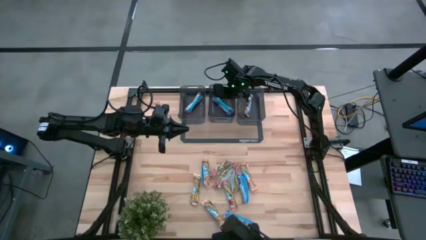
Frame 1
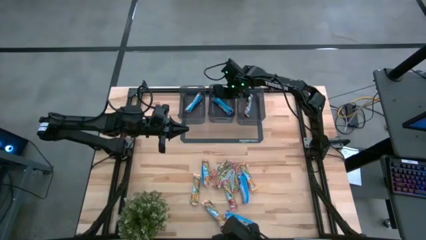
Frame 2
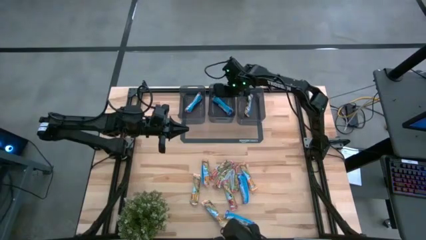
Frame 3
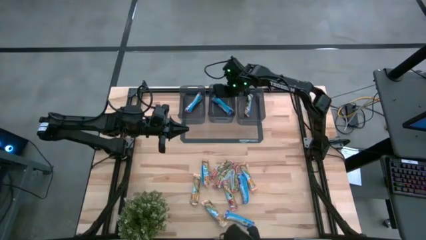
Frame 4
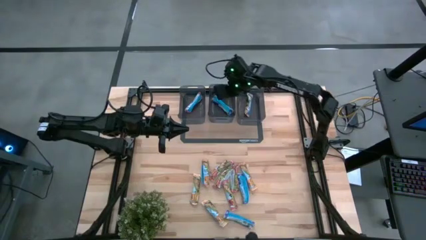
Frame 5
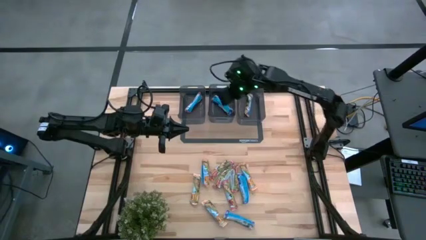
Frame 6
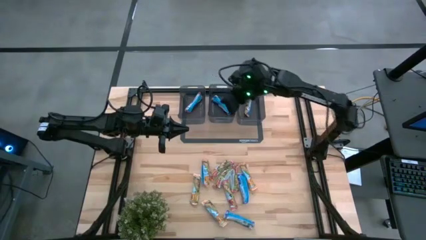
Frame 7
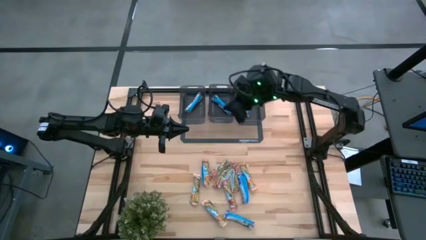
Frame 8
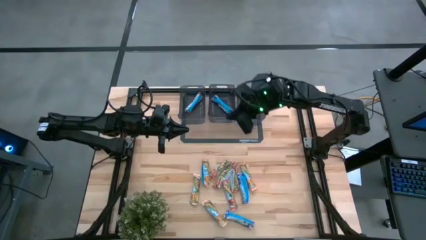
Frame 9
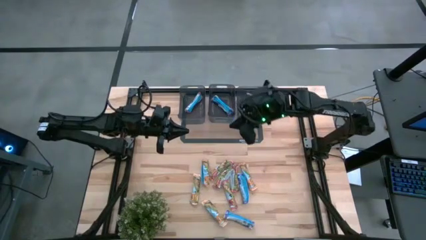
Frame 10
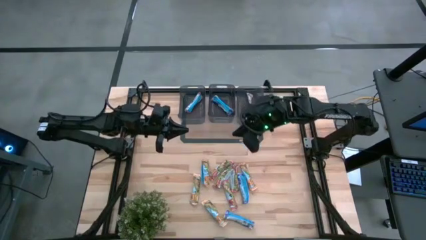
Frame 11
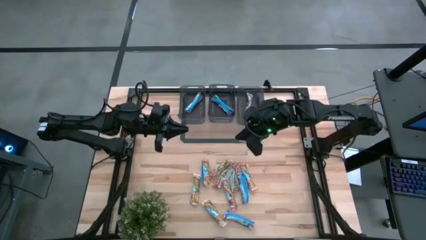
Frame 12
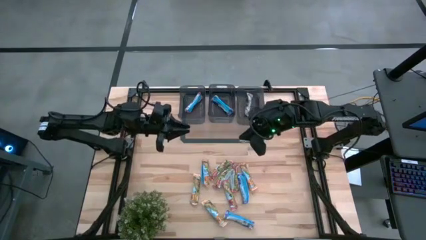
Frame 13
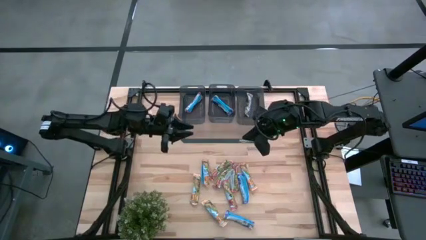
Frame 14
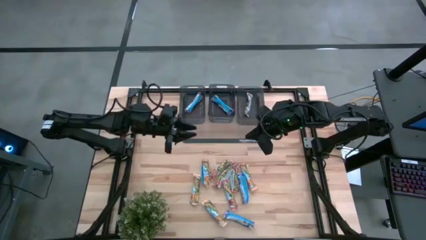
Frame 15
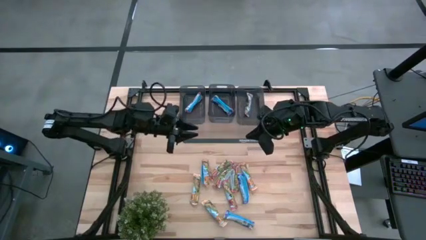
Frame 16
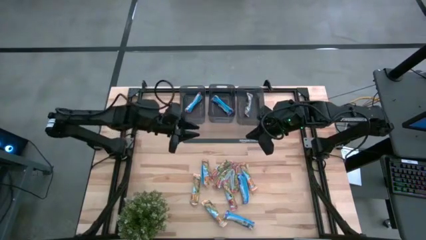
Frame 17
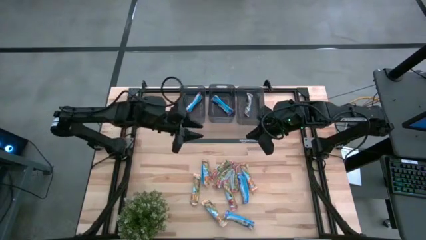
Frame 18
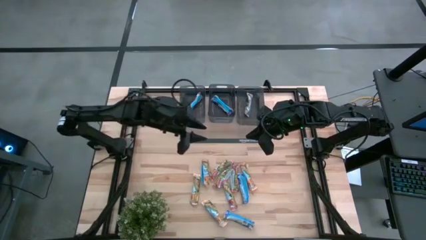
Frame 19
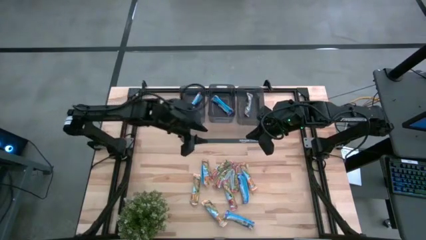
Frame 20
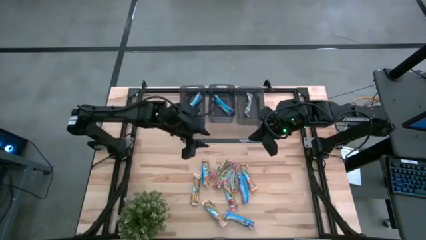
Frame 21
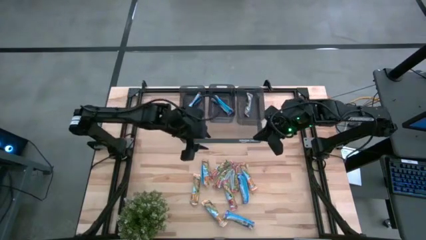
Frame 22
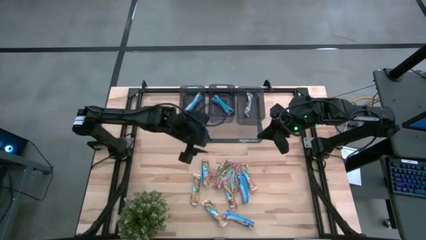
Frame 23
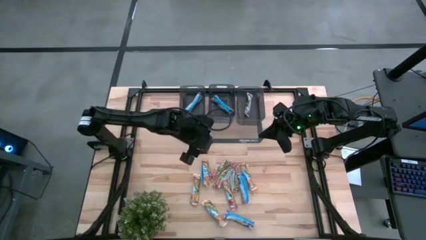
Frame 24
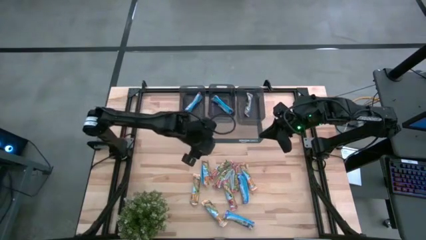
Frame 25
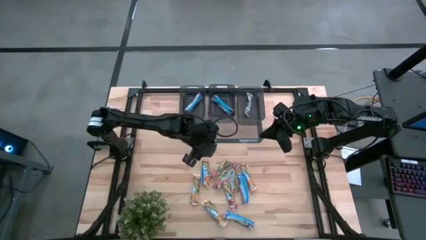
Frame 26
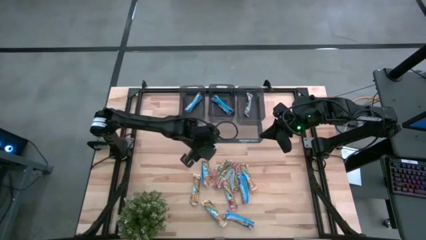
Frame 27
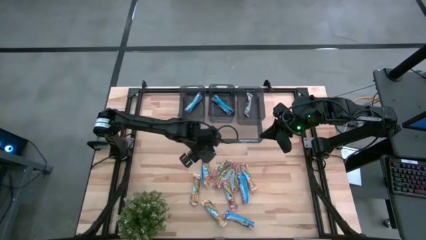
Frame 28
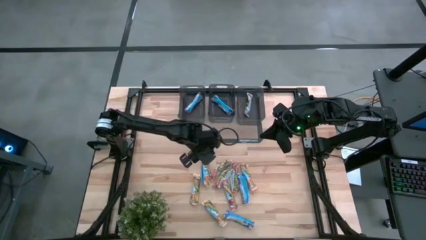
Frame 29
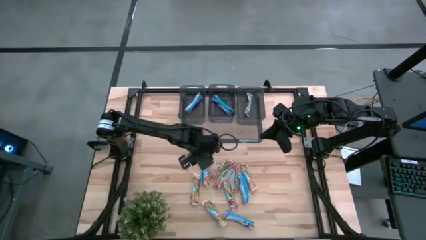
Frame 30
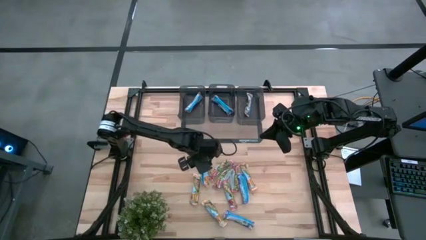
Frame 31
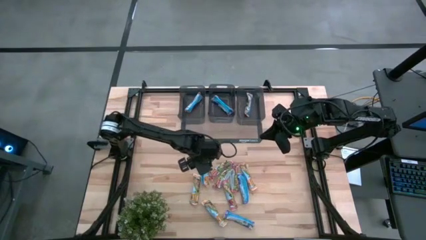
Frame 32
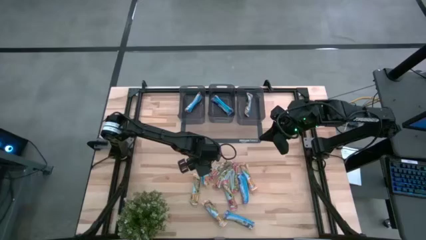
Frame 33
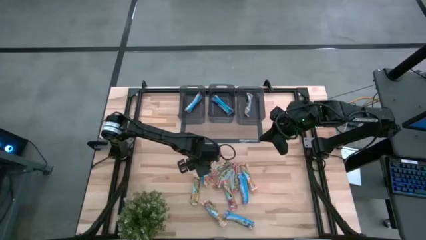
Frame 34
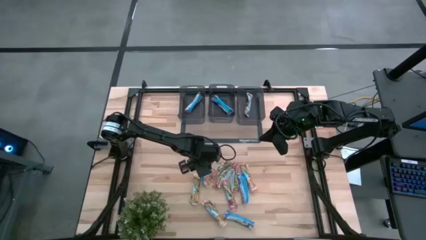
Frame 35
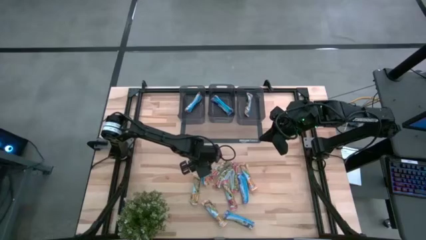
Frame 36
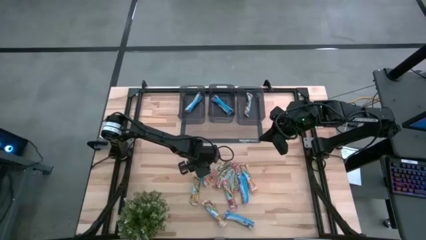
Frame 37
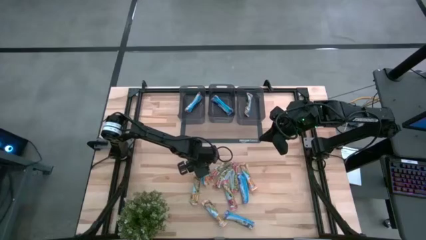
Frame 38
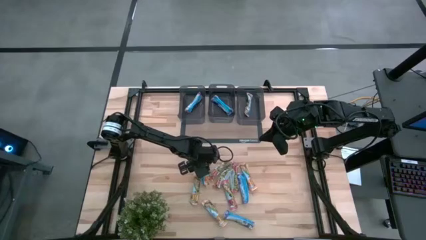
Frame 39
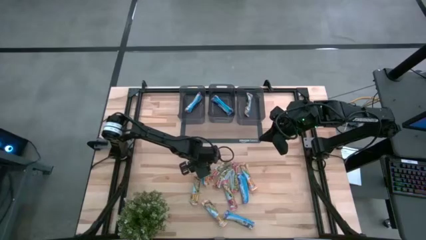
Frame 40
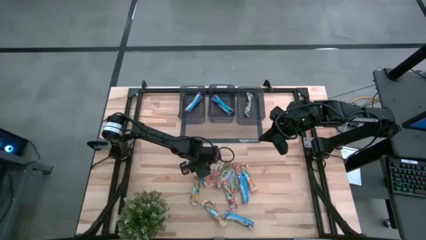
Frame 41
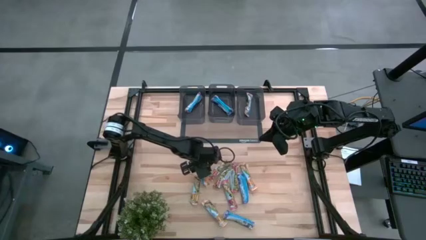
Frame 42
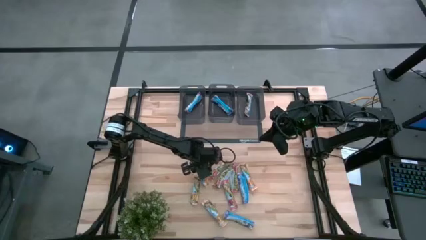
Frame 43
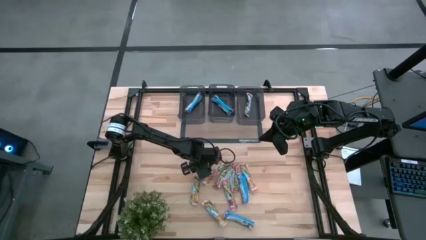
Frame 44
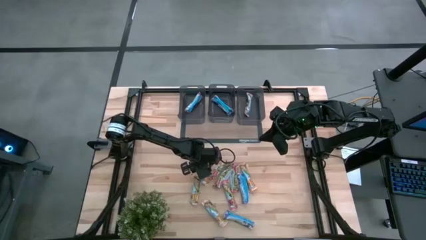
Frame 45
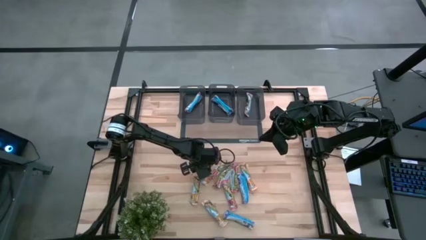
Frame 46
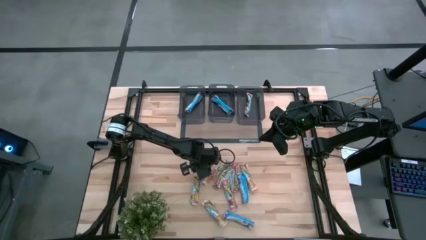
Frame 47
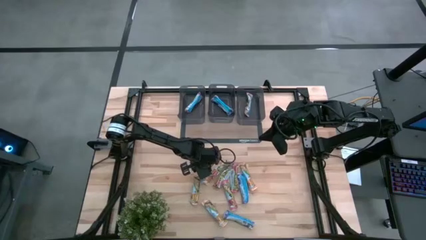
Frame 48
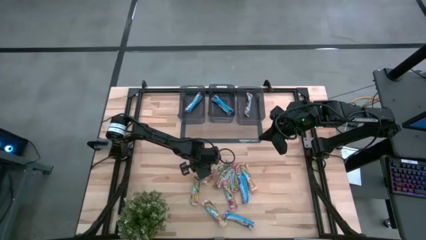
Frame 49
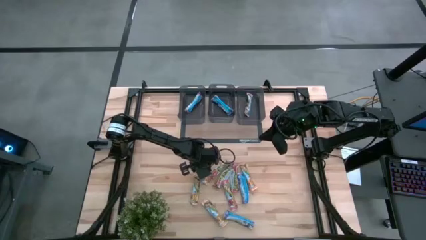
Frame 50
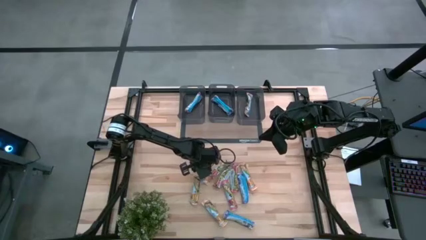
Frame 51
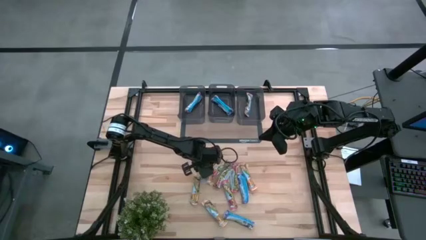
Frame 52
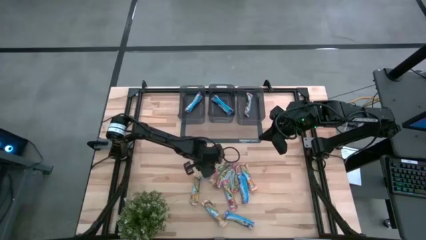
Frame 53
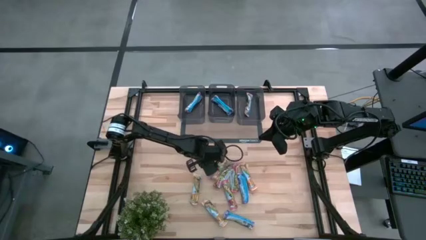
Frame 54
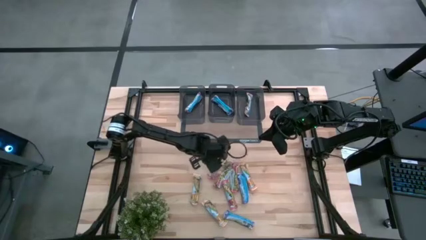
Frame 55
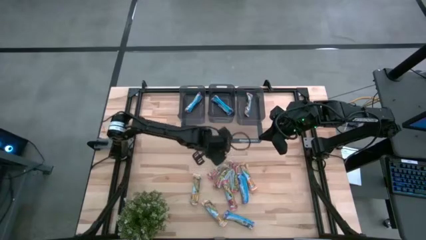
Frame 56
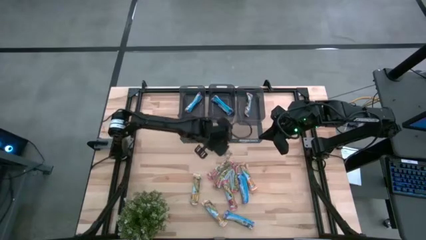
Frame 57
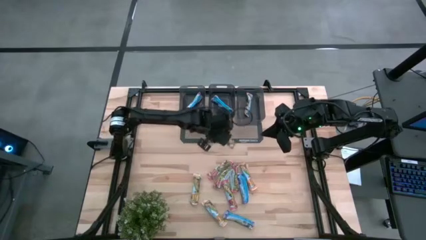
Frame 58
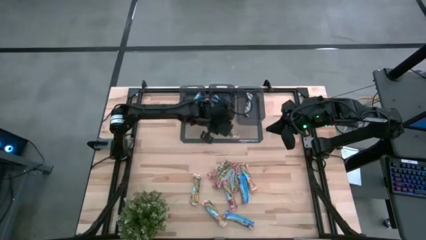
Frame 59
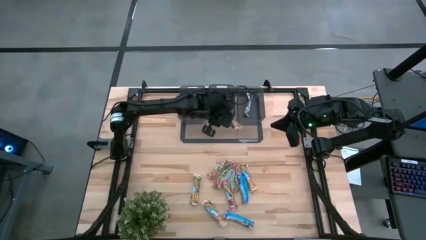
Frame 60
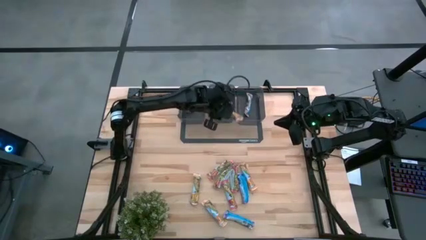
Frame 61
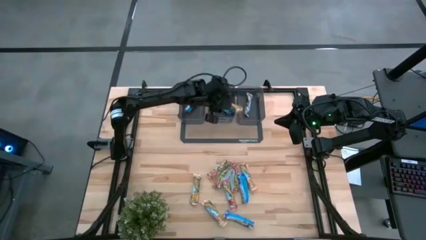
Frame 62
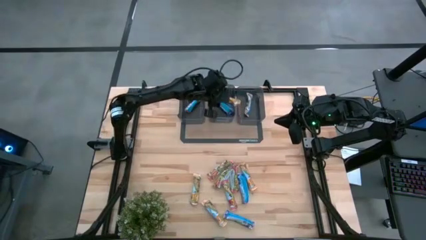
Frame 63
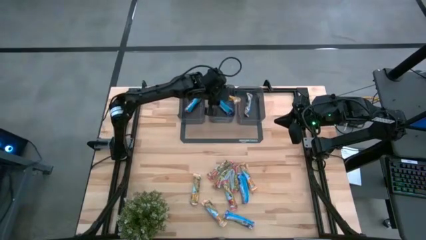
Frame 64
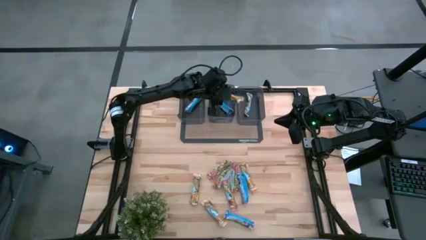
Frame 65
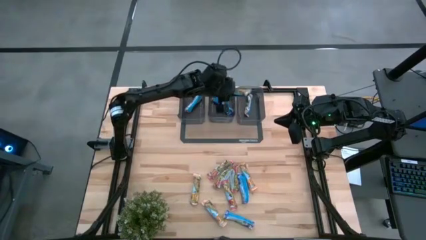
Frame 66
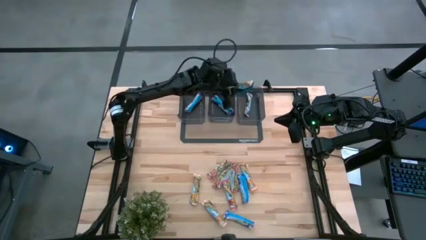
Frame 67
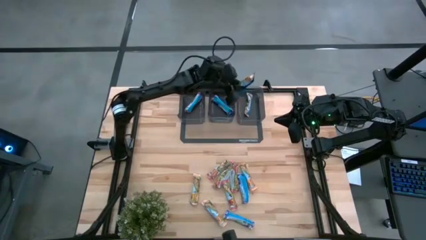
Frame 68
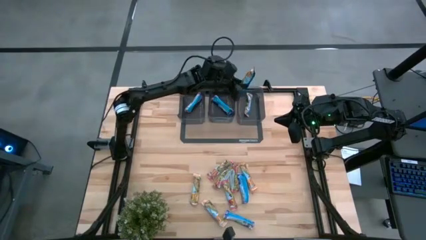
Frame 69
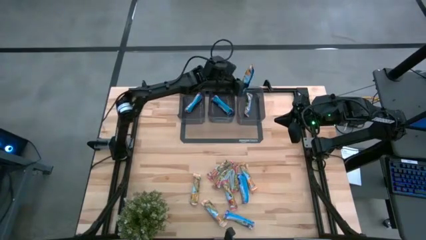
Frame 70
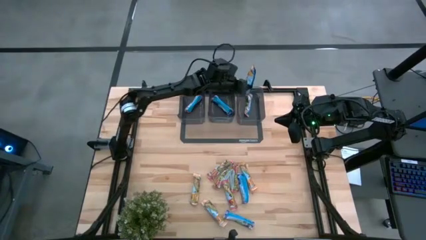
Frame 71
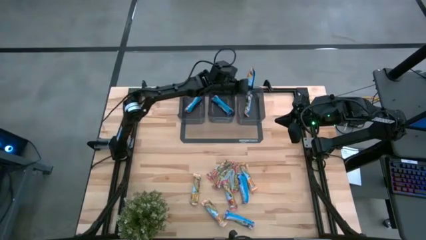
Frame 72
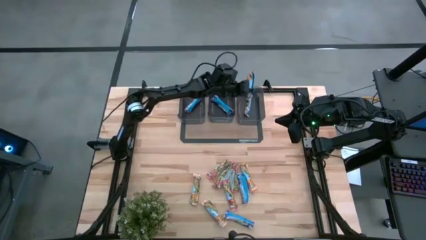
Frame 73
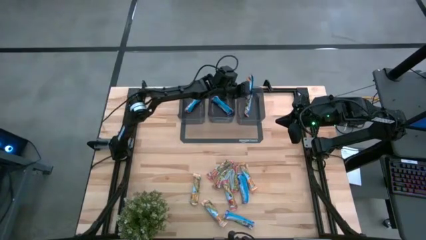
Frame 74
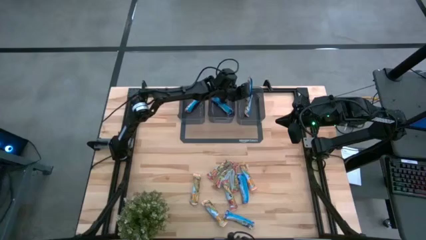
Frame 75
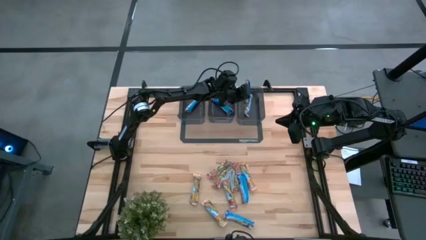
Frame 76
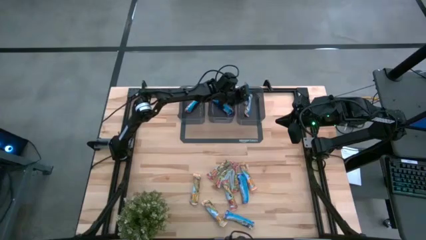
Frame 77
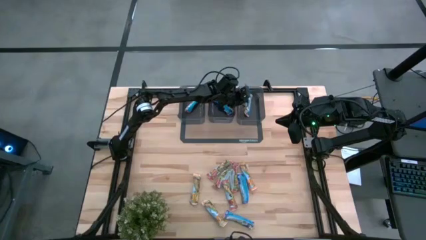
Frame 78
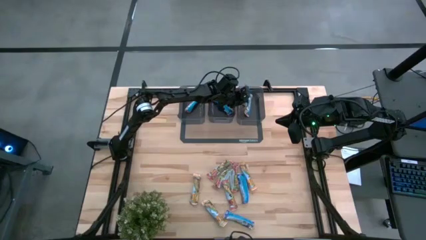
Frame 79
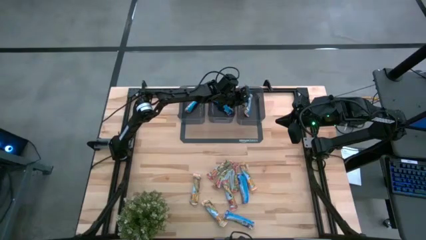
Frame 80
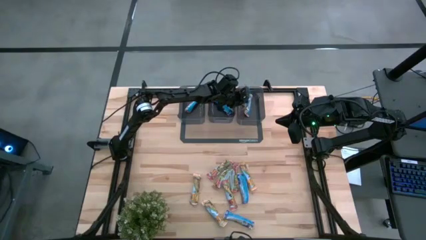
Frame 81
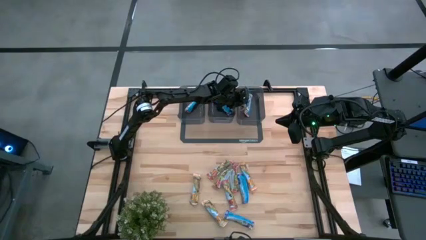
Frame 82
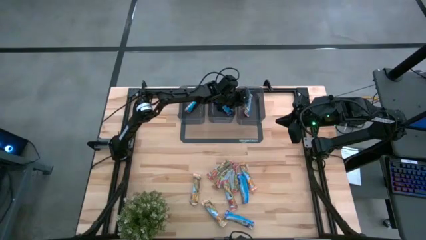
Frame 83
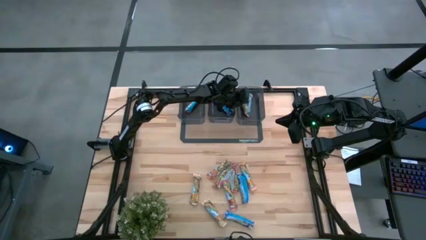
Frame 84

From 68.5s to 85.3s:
Task: Pick and place Granola Bars by type
Put the yellow granola bar into the right black bin
